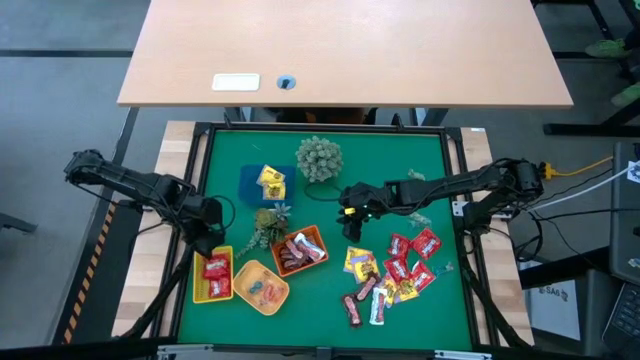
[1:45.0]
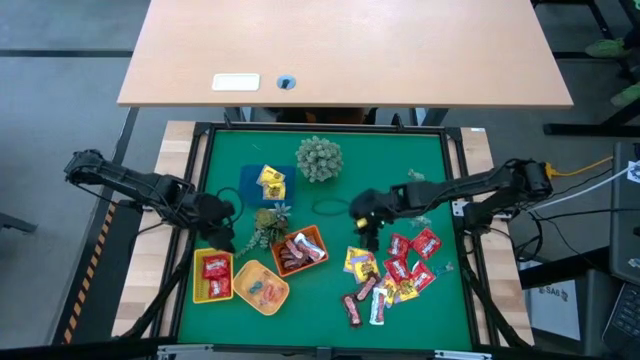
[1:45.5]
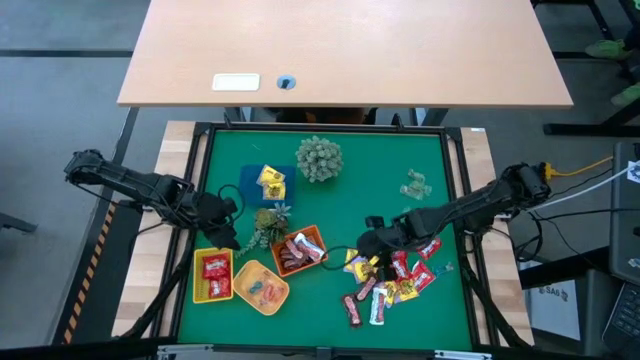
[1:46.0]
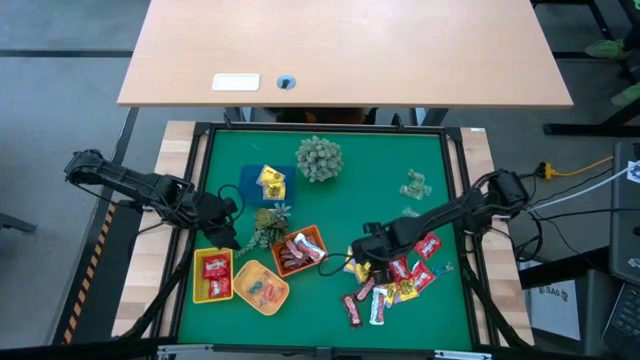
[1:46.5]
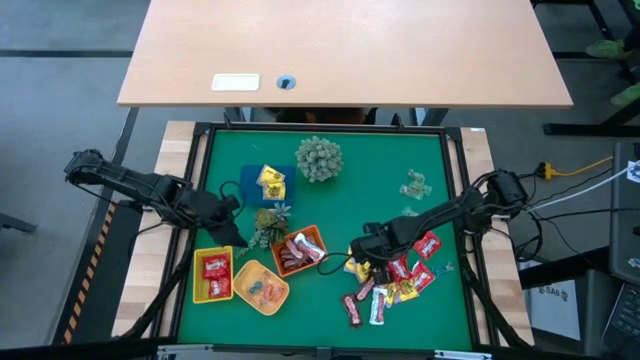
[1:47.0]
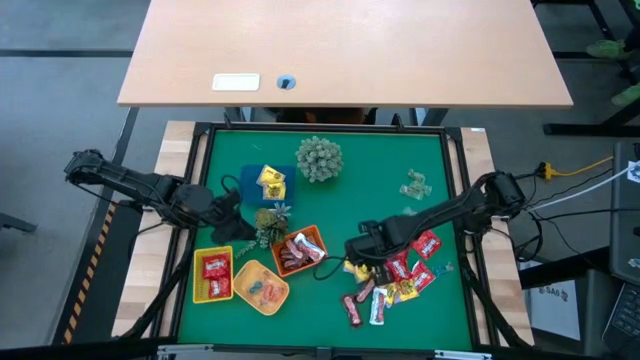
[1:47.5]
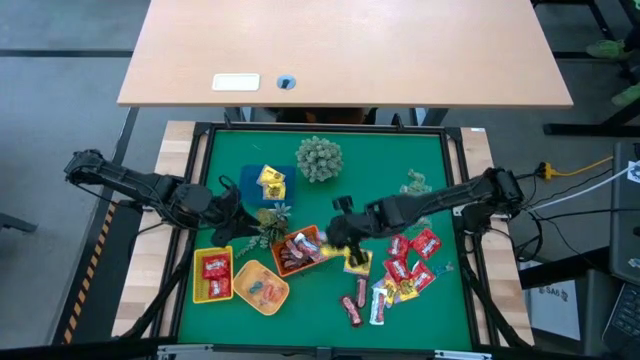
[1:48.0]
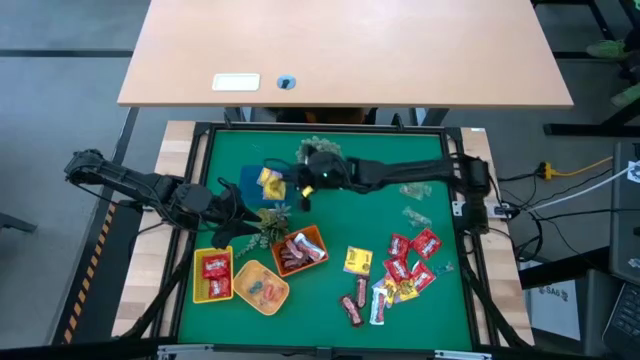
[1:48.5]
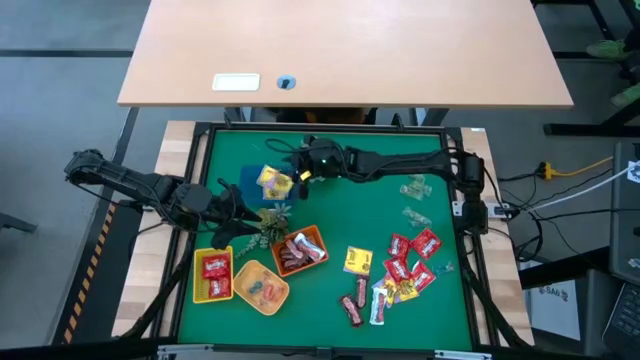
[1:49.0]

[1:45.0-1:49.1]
Task: Sort candy
Put the yellow candy into the blue bin

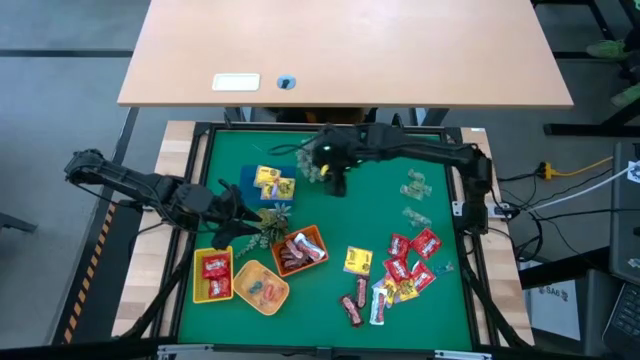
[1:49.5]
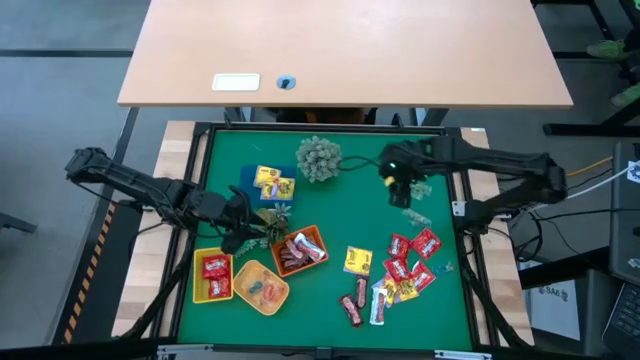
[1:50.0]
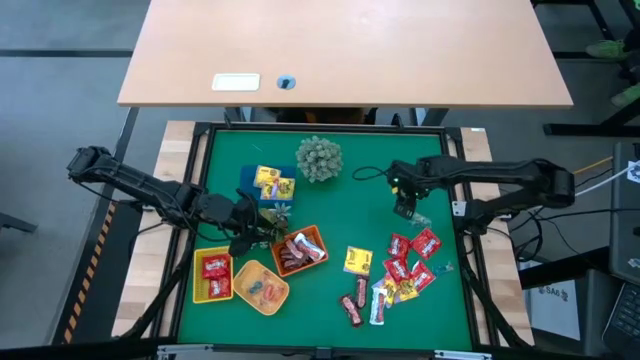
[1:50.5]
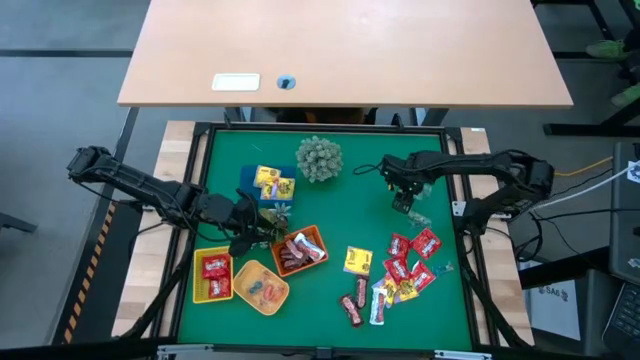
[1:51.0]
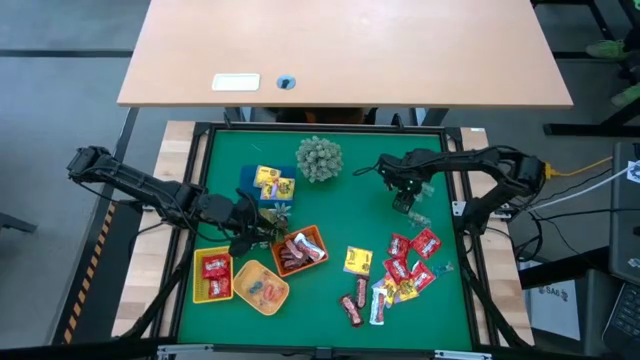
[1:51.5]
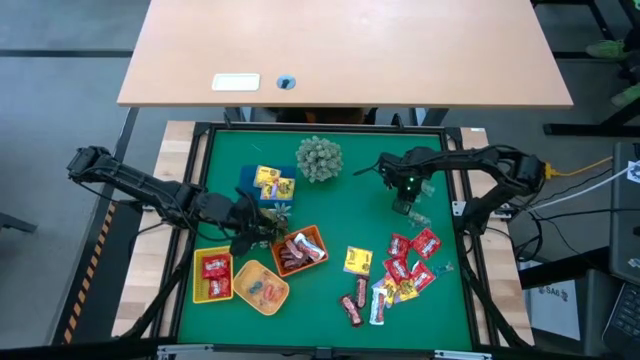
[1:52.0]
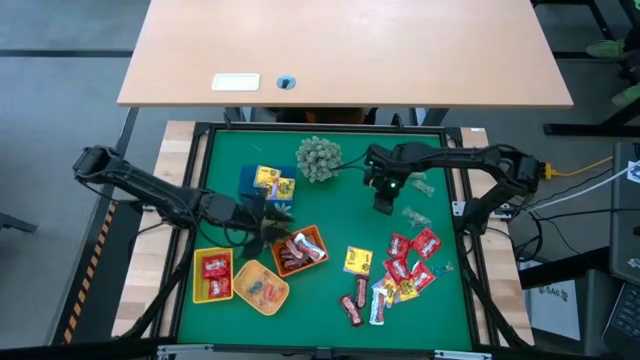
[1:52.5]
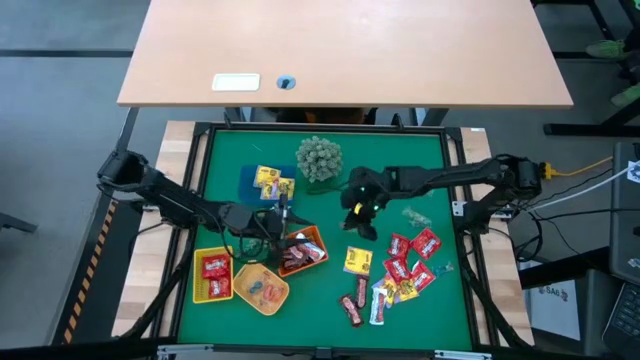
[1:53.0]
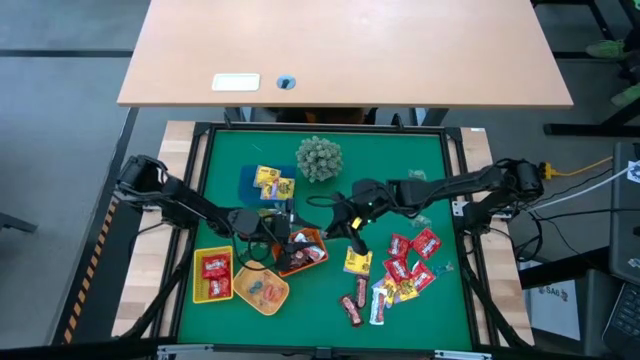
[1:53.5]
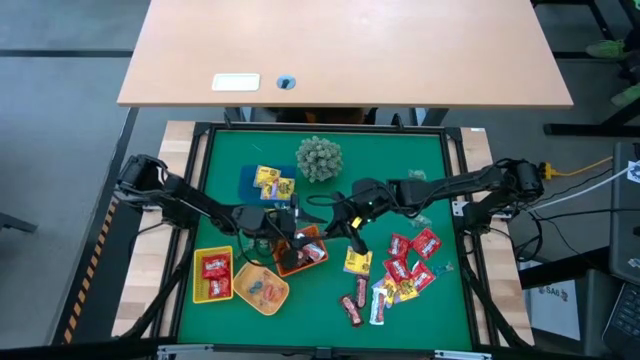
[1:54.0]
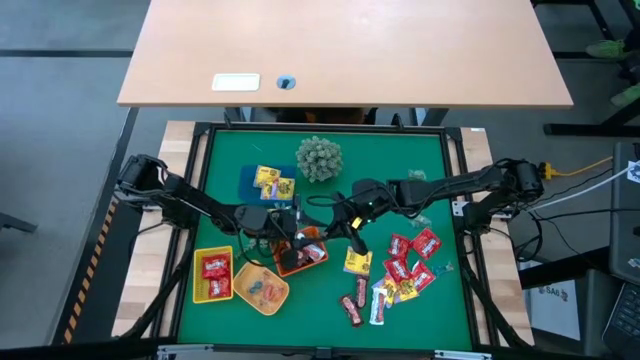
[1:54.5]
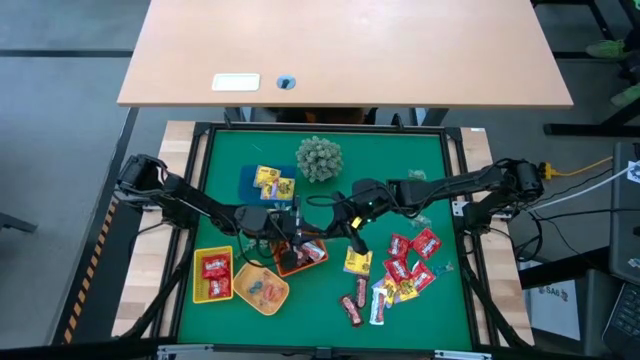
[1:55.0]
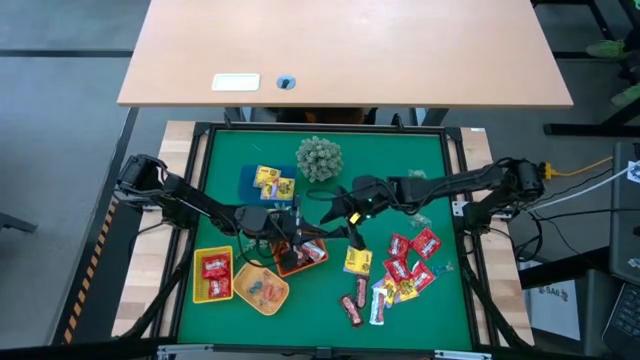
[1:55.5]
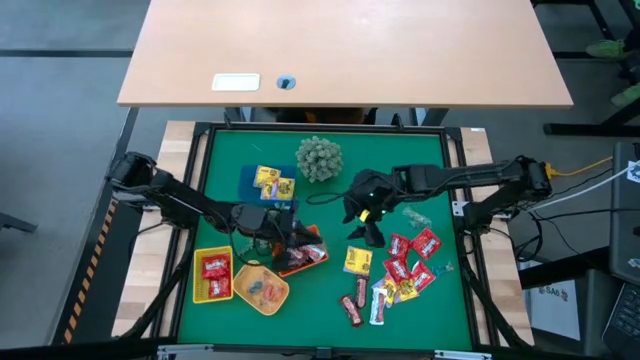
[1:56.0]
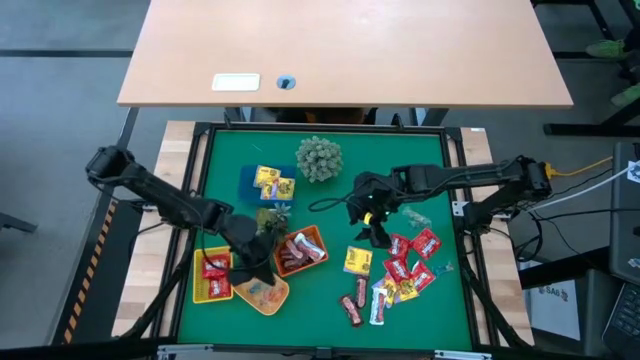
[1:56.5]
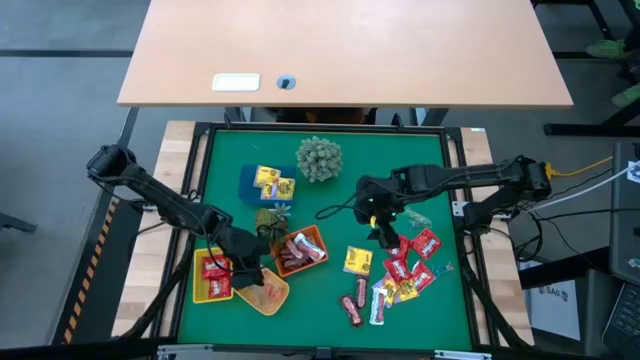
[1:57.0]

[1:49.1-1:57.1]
Put the green gummy into the light orange bin

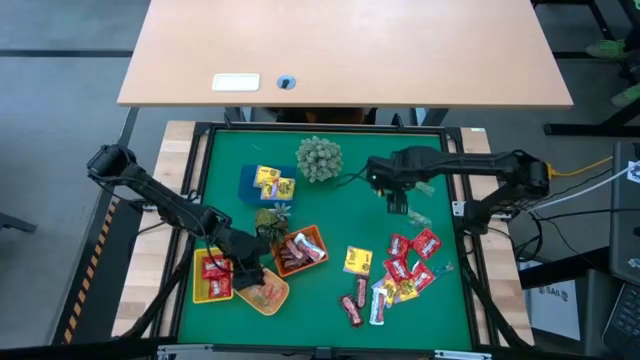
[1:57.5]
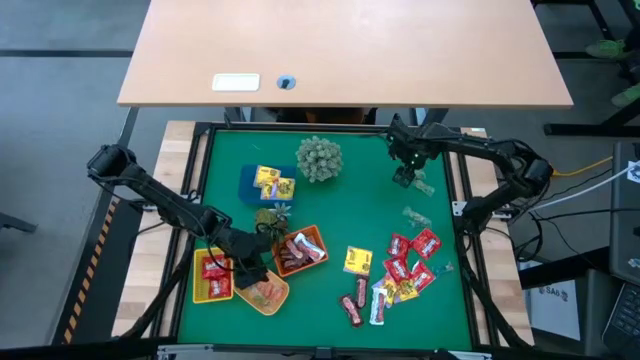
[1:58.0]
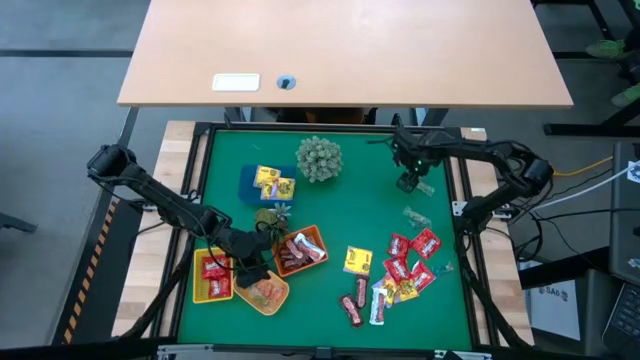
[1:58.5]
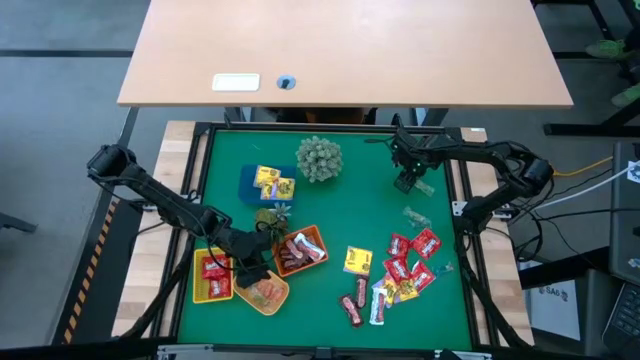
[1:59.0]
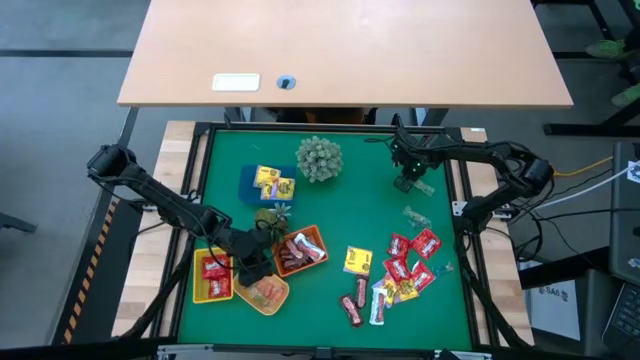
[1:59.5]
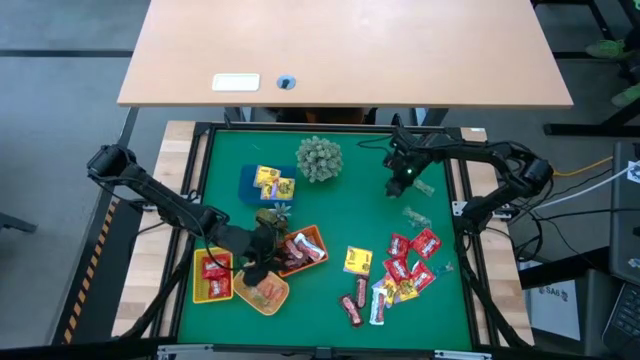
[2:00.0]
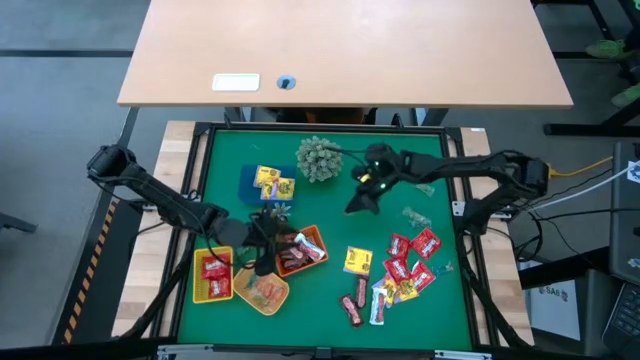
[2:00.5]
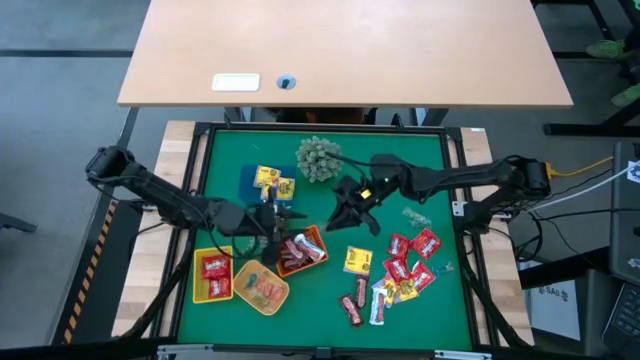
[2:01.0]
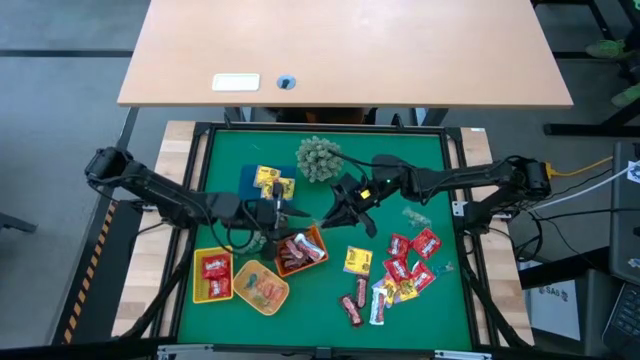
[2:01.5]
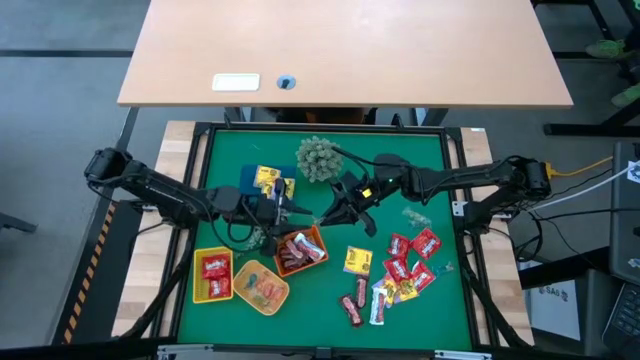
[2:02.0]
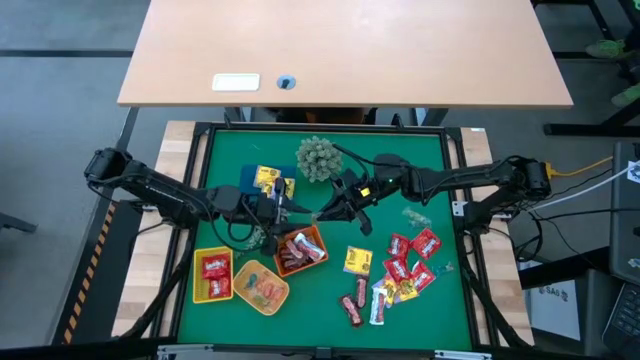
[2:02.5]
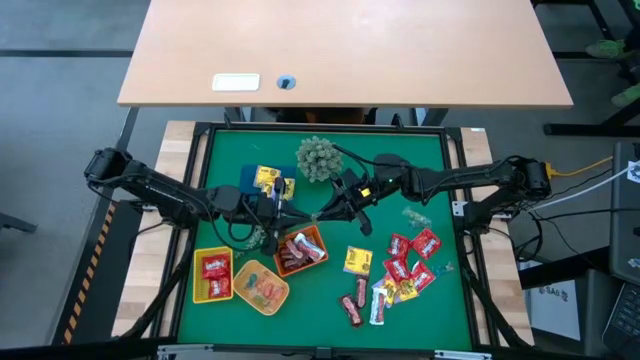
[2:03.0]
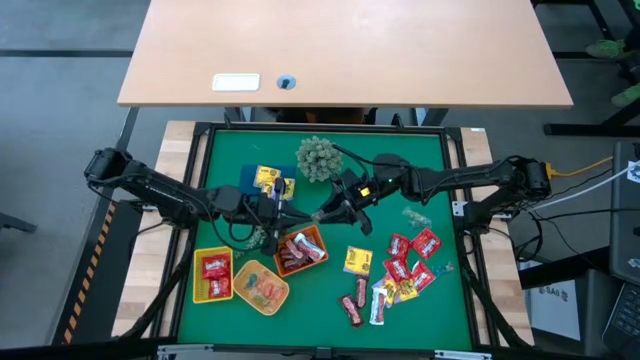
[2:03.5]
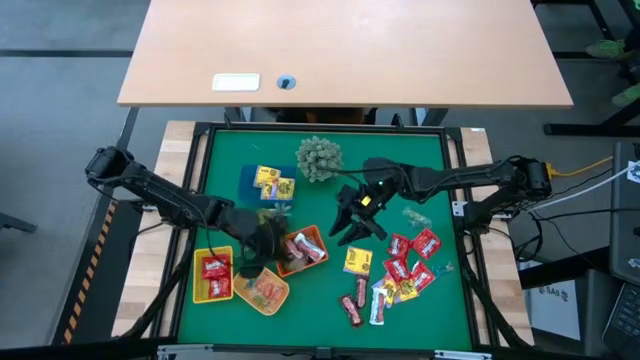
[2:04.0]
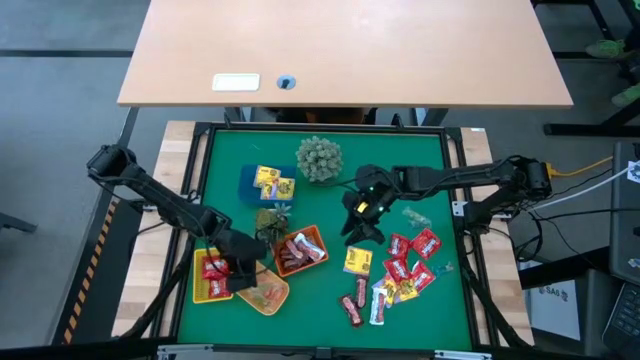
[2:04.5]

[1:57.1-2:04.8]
Put the green gummy into the light orange bin

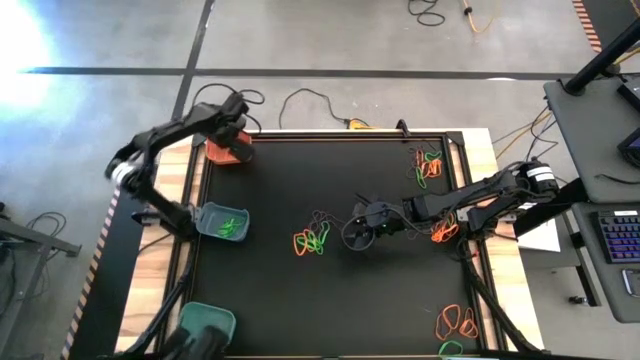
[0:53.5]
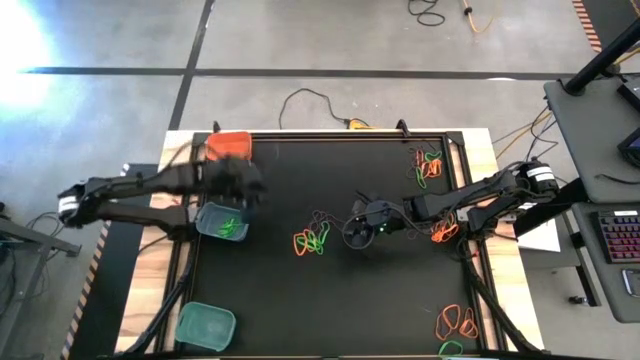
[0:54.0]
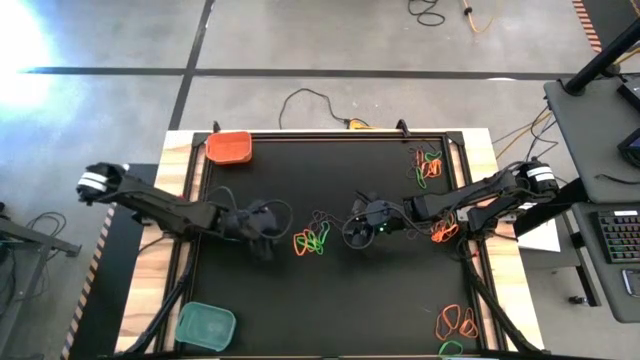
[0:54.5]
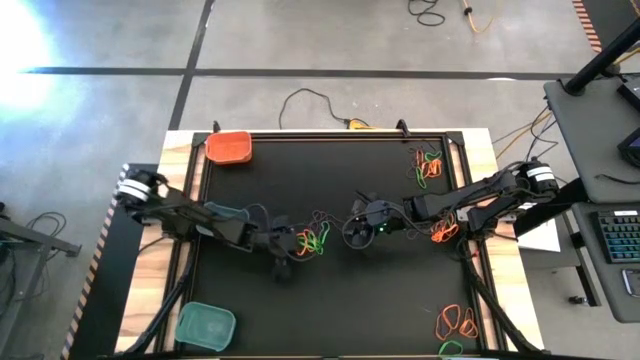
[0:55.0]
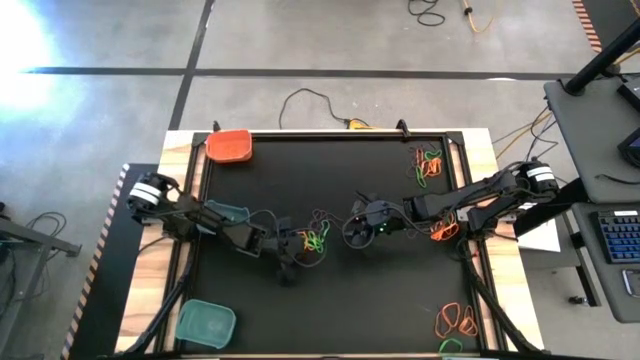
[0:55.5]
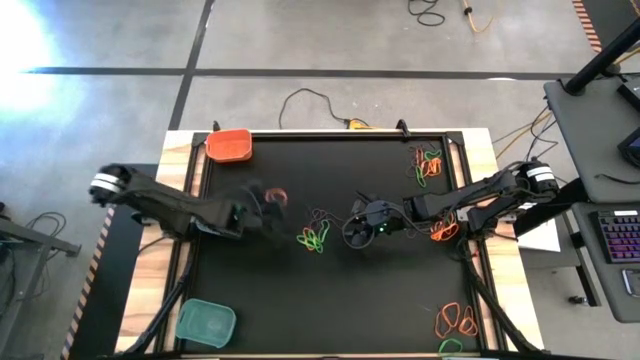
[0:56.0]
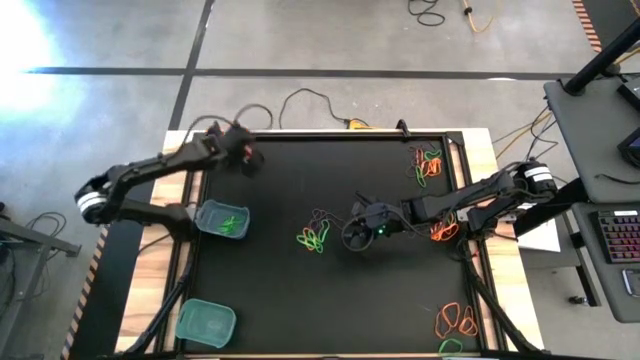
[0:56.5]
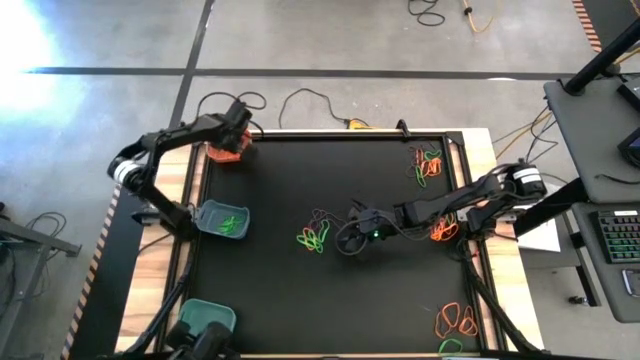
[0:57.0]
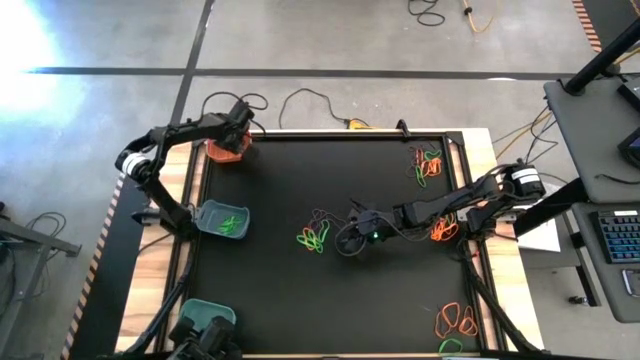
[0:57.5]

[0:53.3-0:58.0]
Task: Sort rubber bands into baskets
Put the orange rubber band into the orange bin
